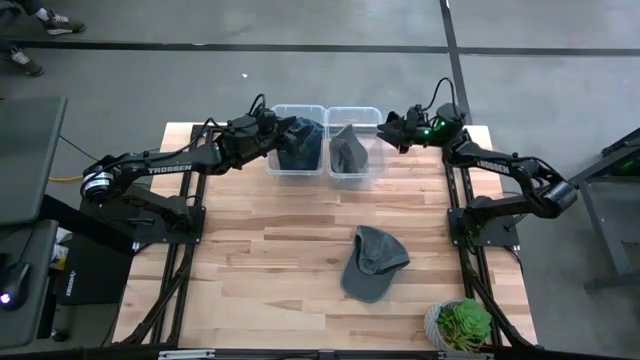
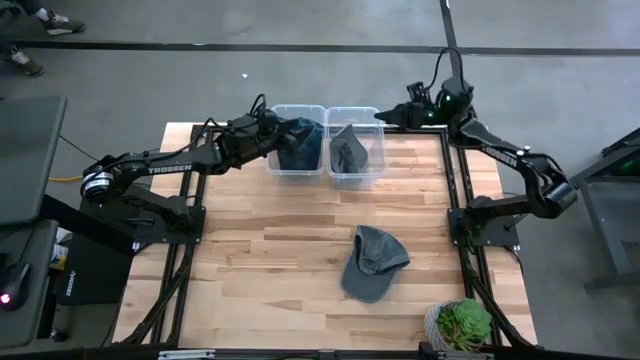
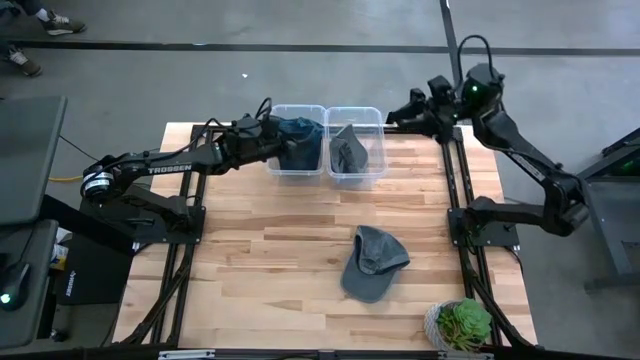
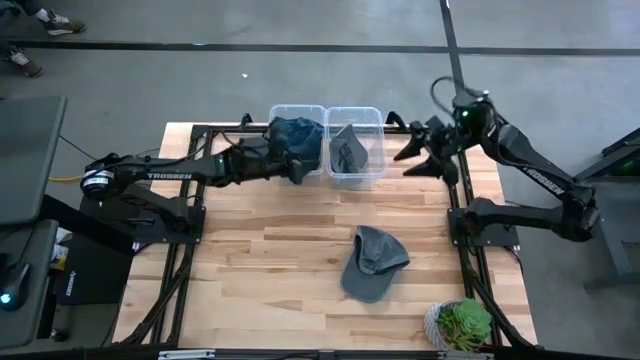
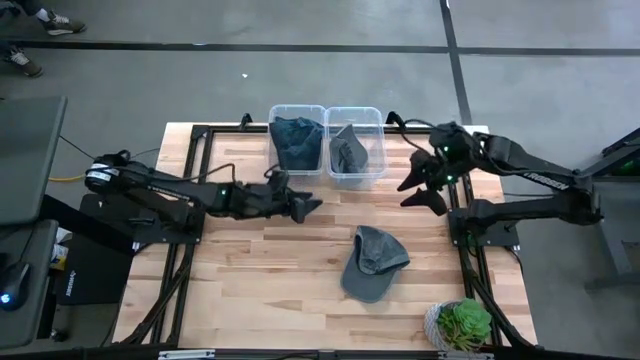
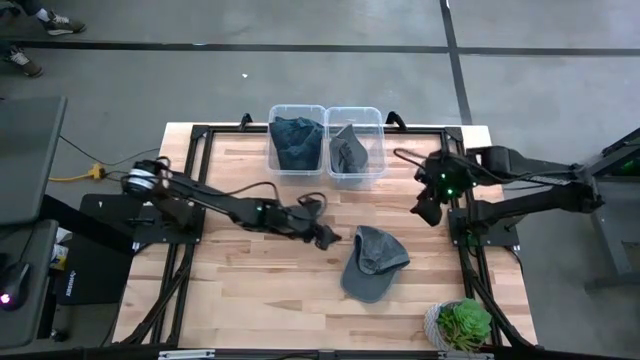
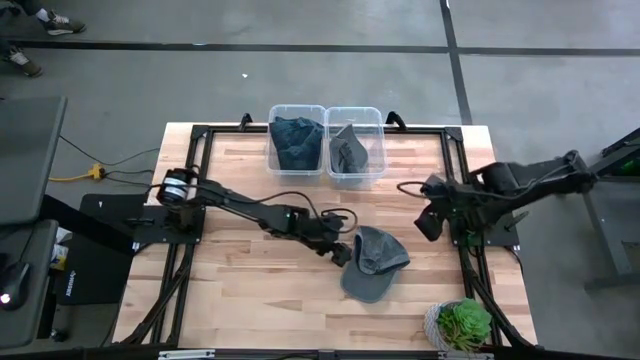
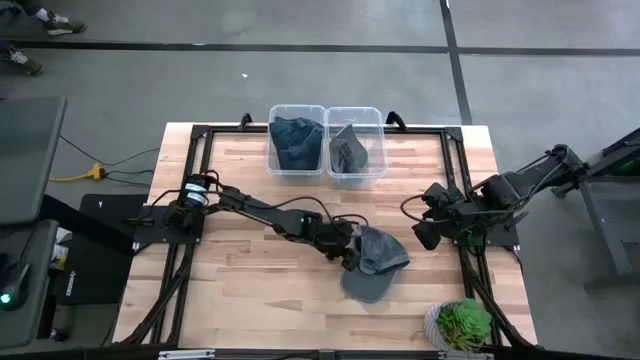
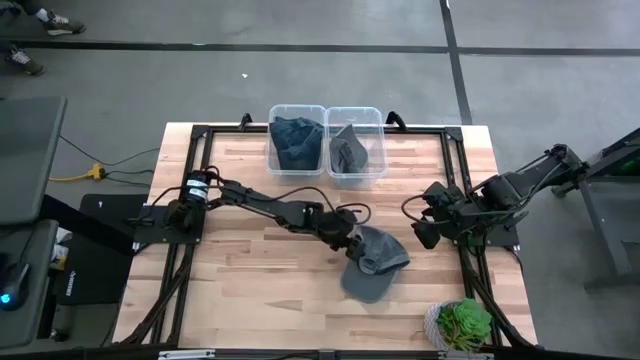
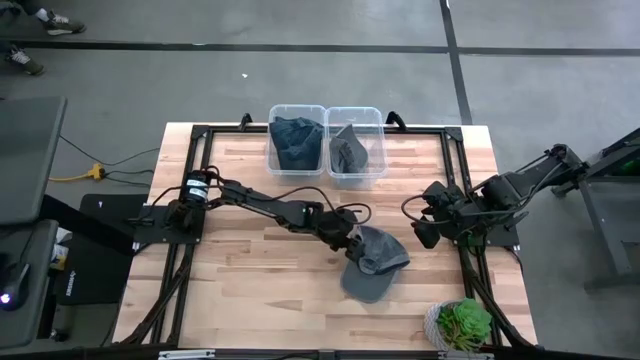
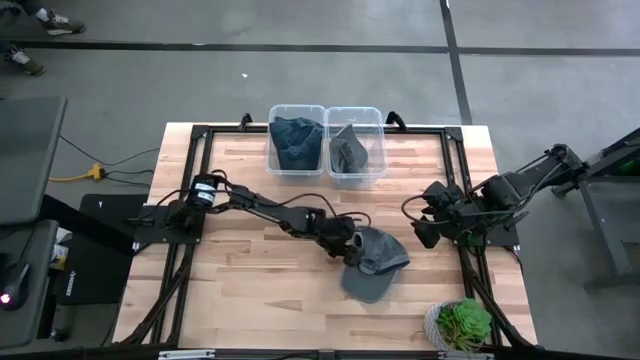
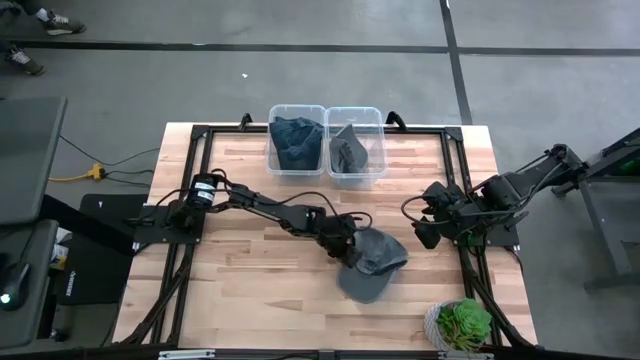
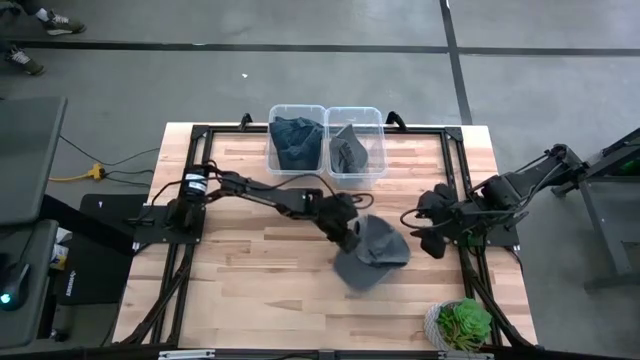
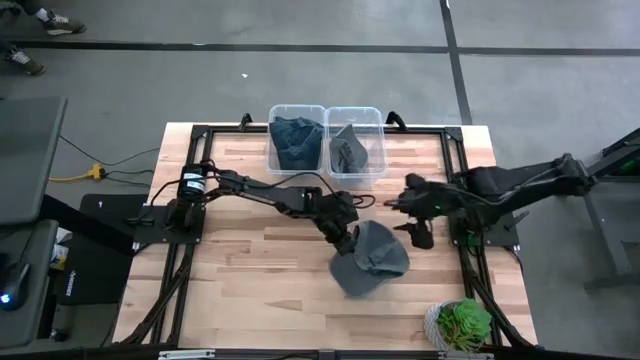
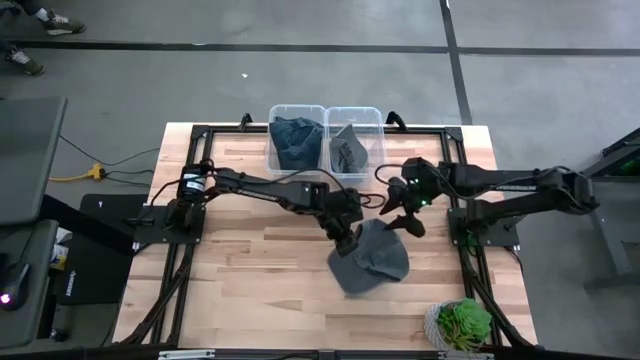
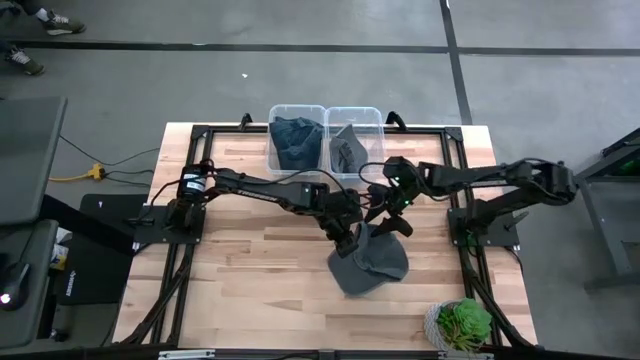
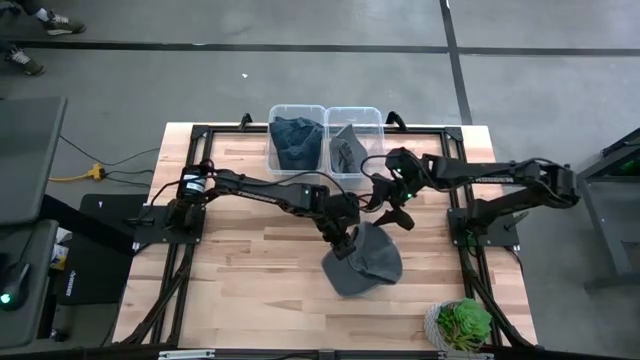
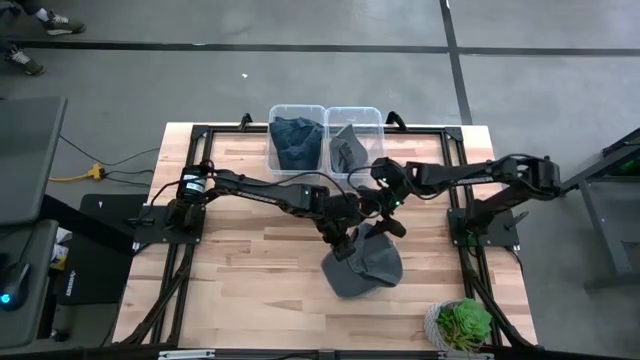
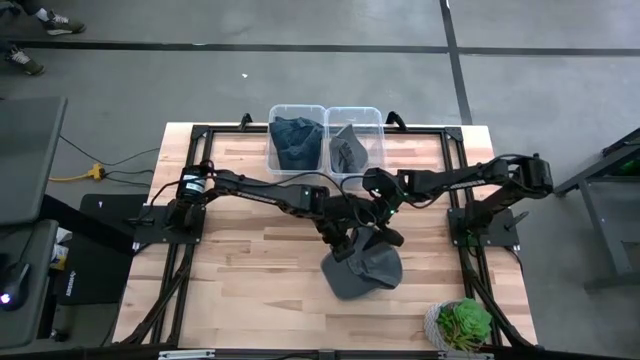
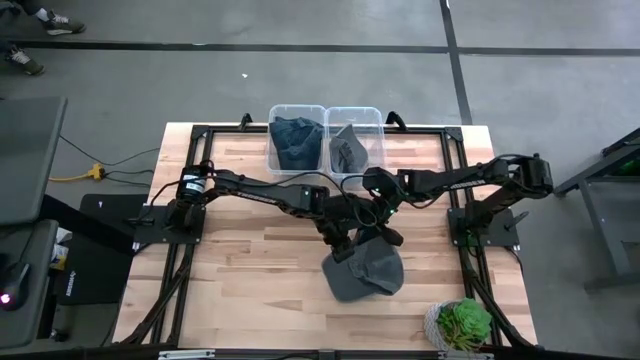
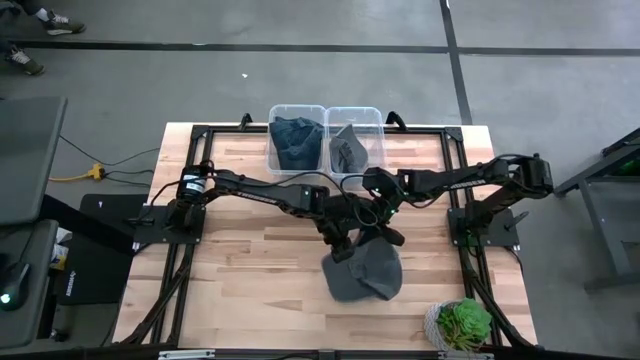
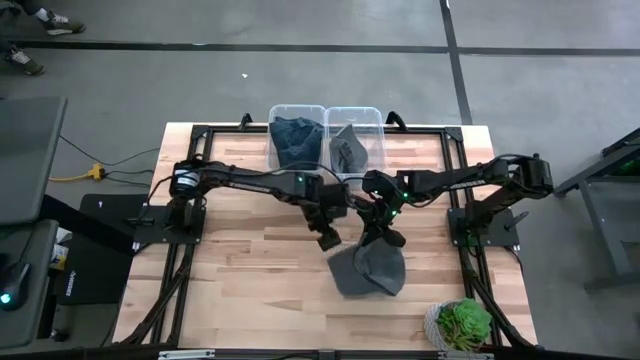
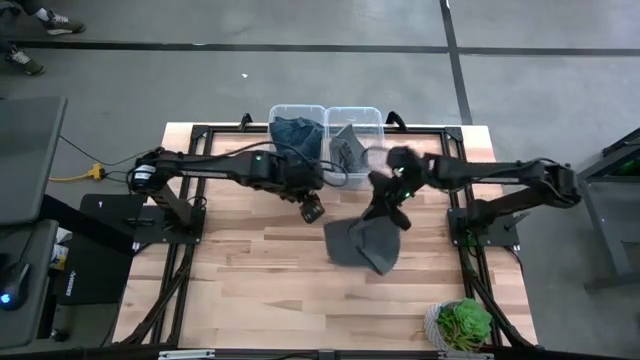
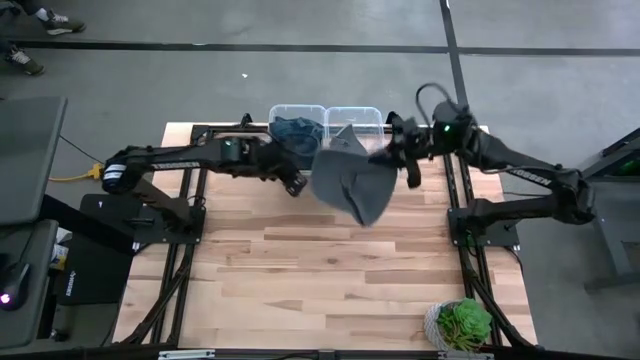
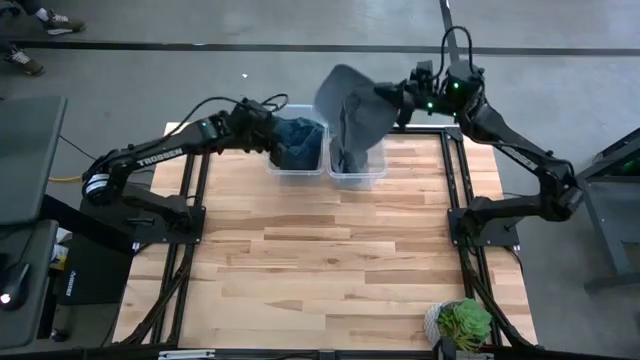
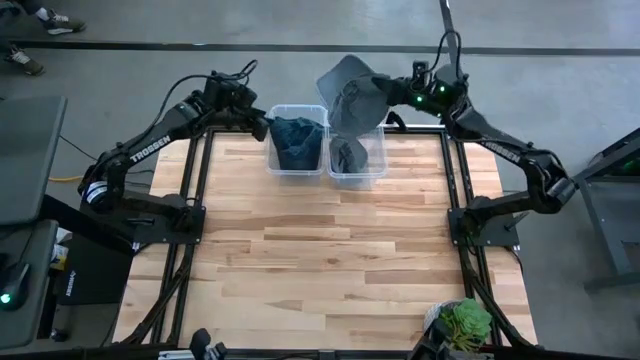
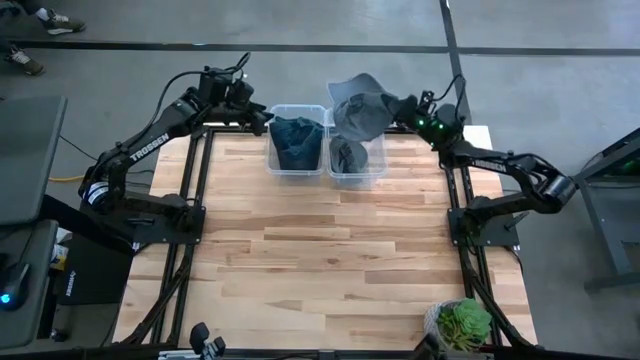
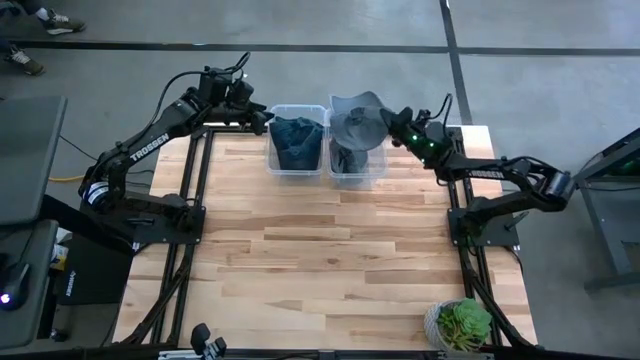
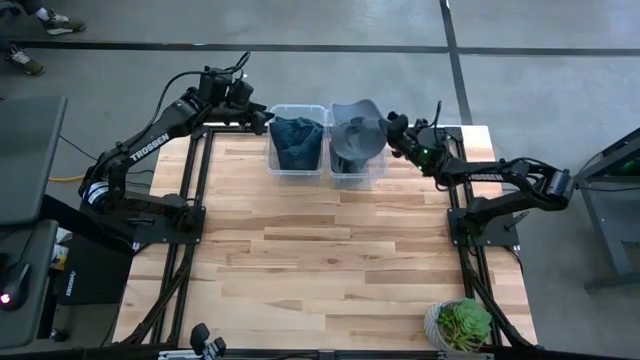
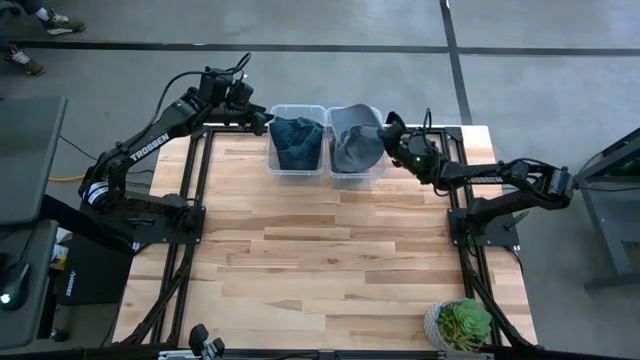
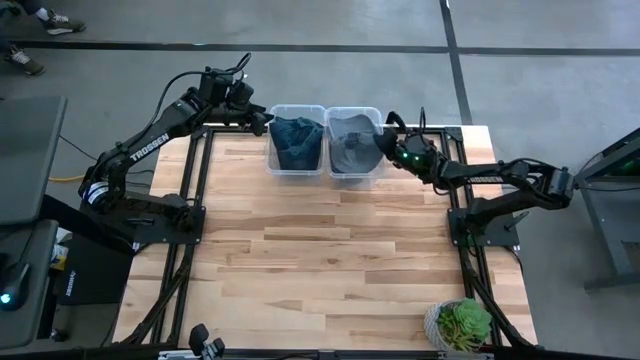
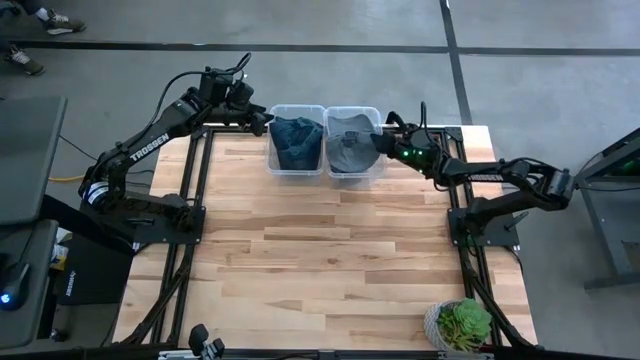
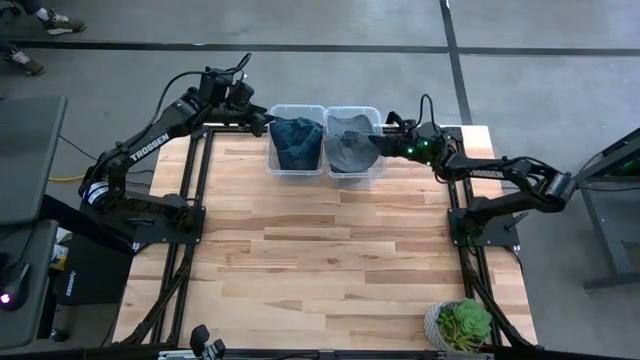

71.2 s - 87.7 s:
Task: Pick & Place hat
Put the gray cap into the right transparent bin

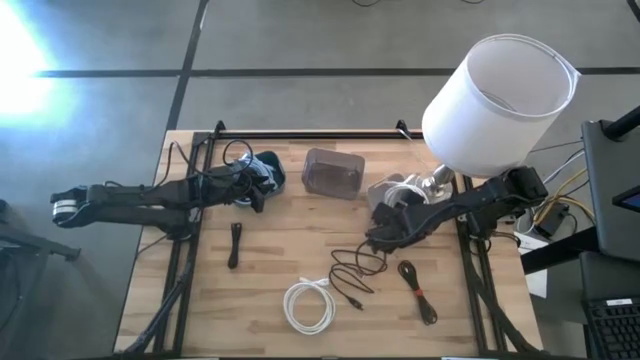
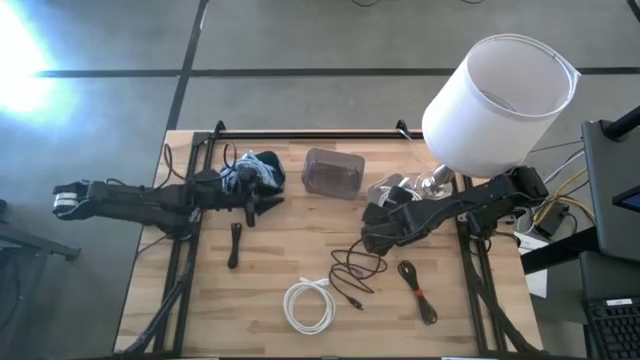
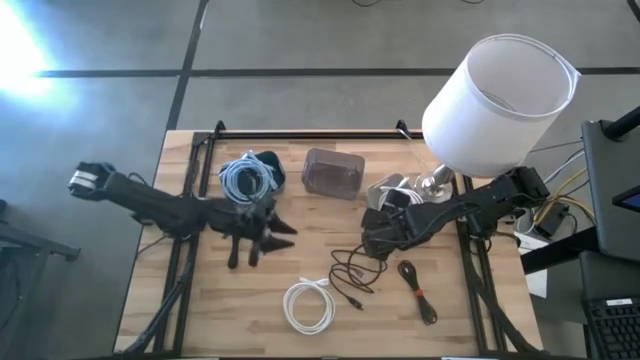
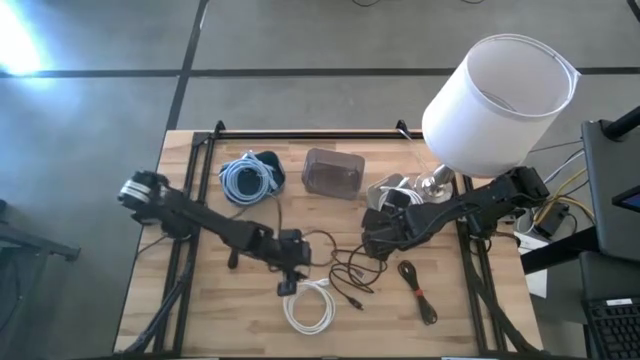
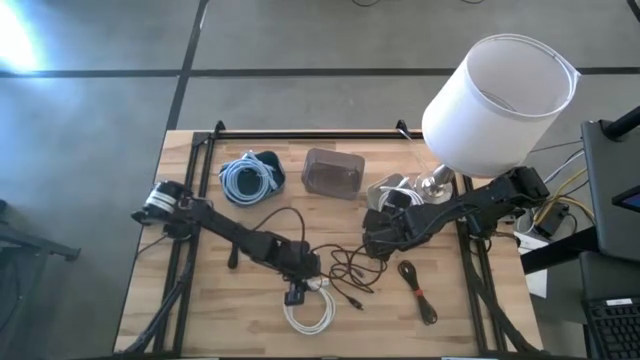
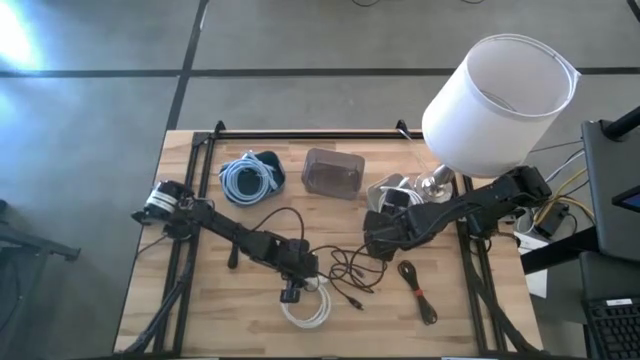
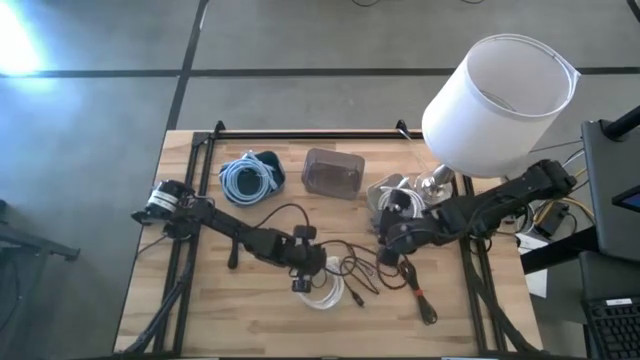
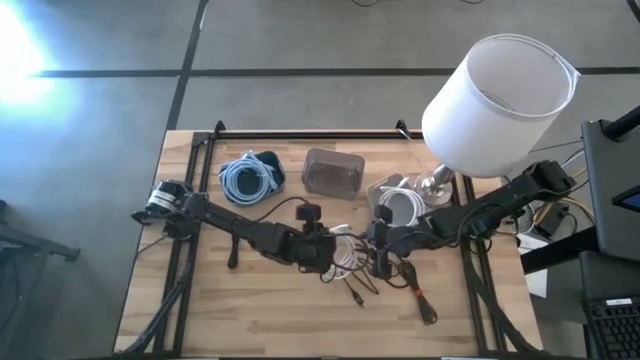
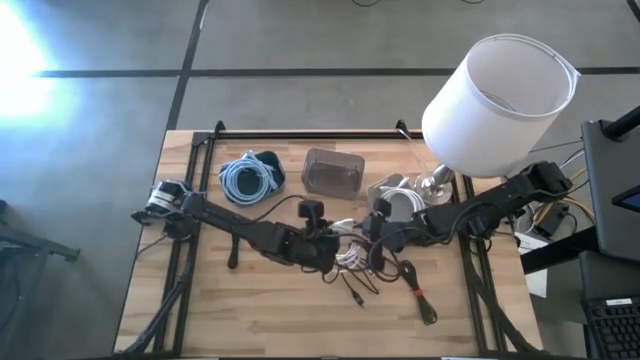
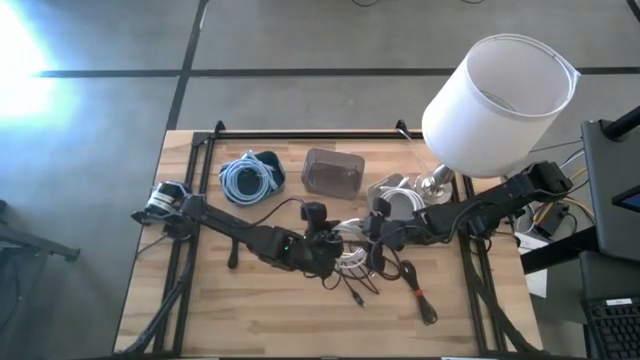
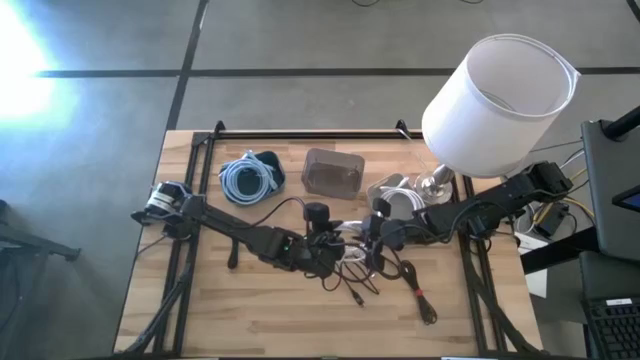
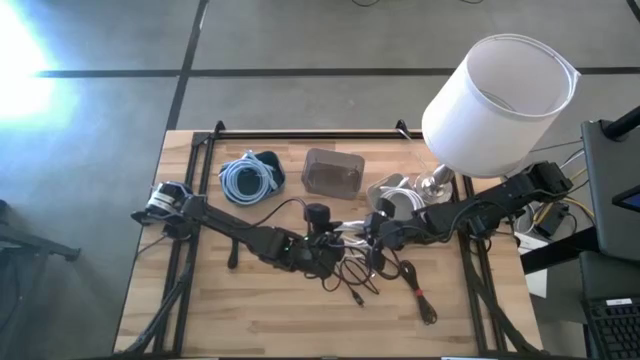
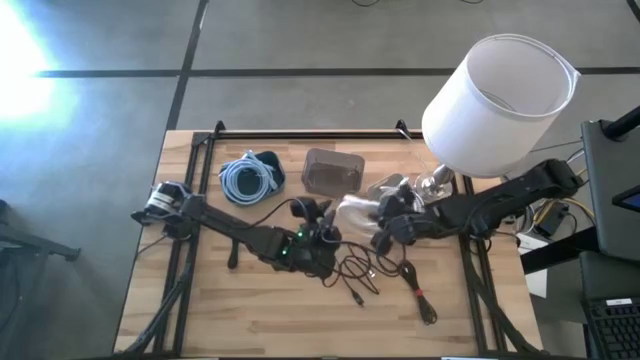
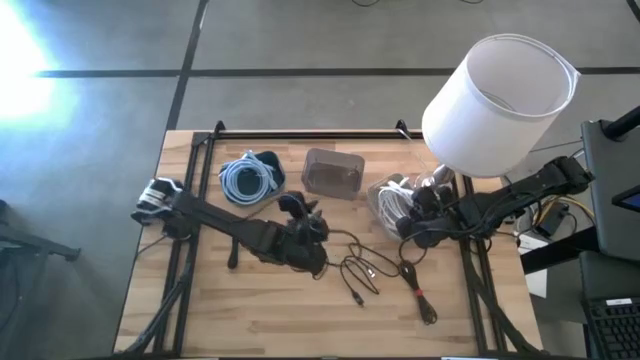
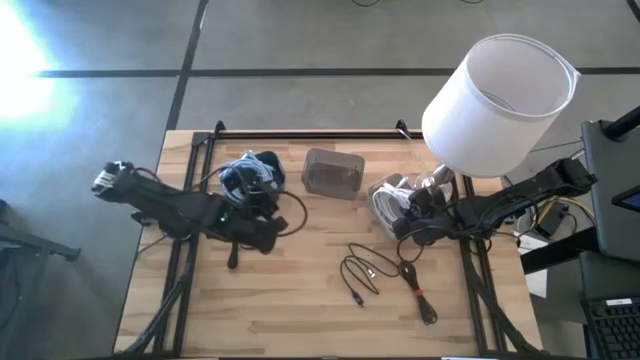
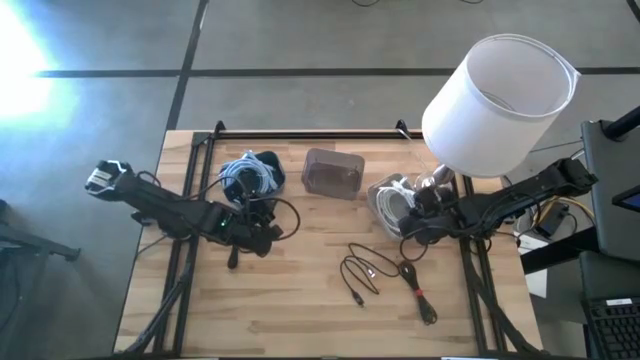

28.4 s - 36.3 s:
Task: Pick & Place USB Port
Put the white HDMI cable into the gray bin
